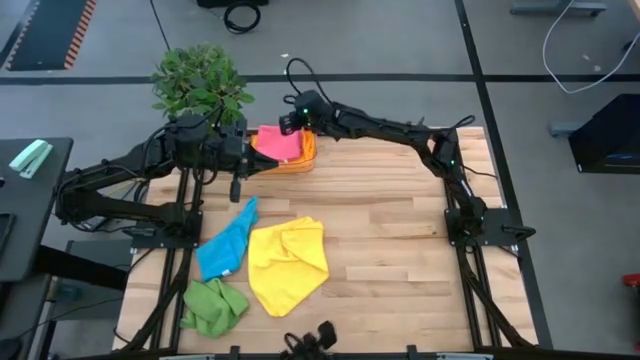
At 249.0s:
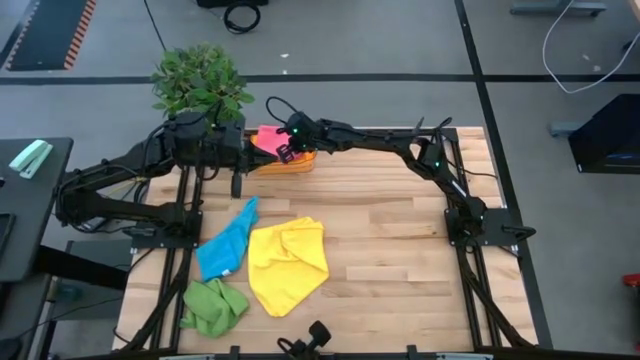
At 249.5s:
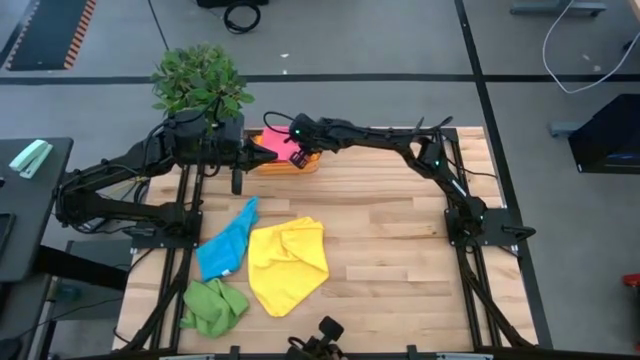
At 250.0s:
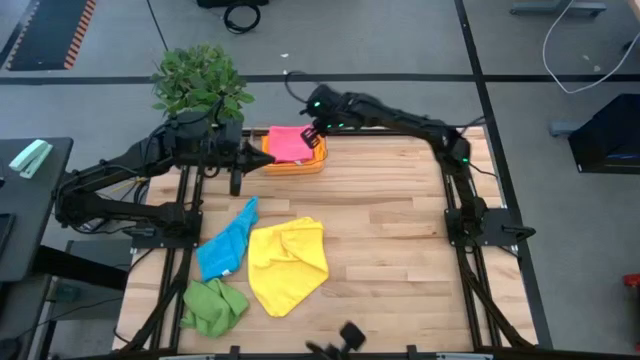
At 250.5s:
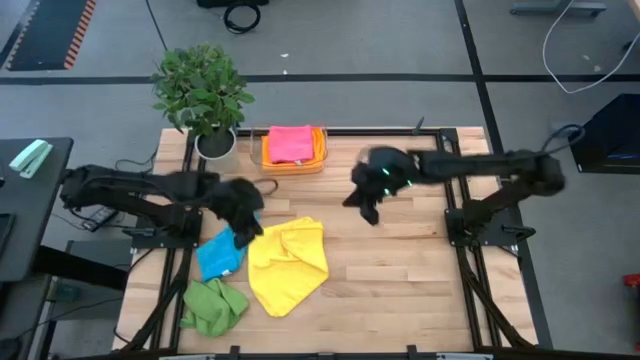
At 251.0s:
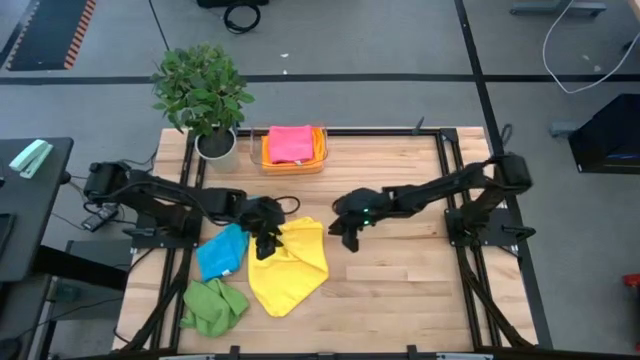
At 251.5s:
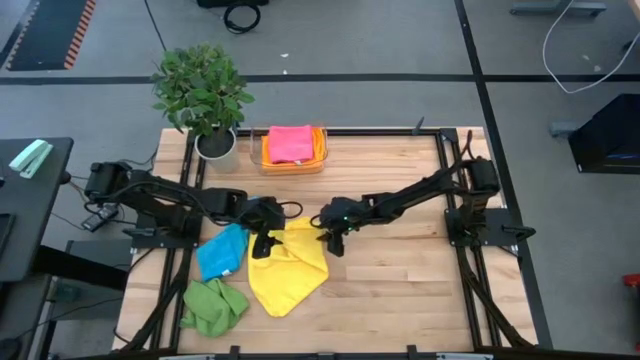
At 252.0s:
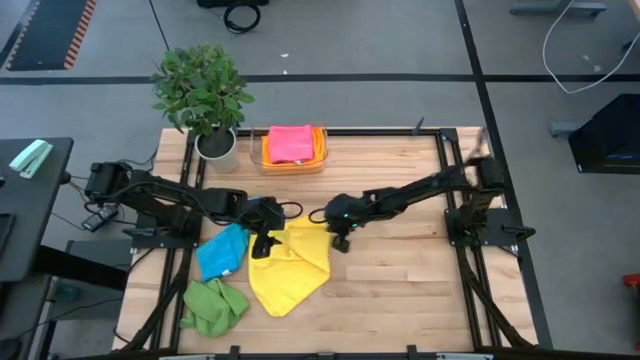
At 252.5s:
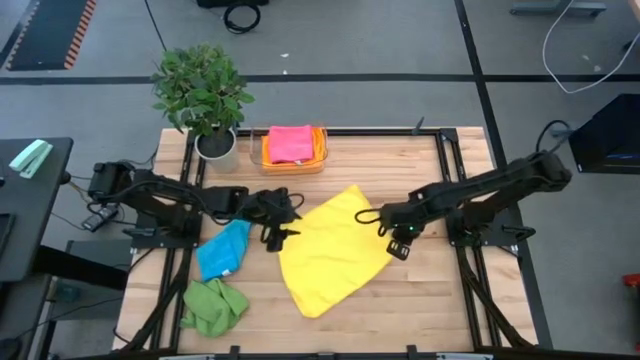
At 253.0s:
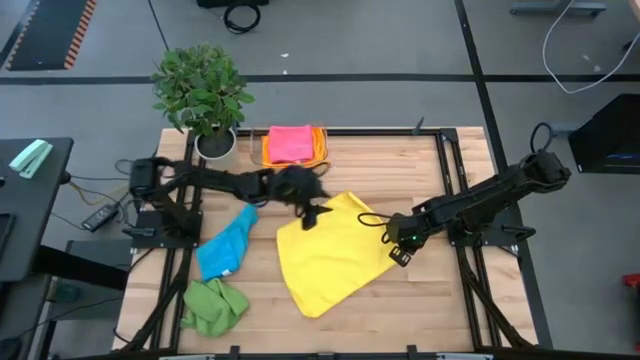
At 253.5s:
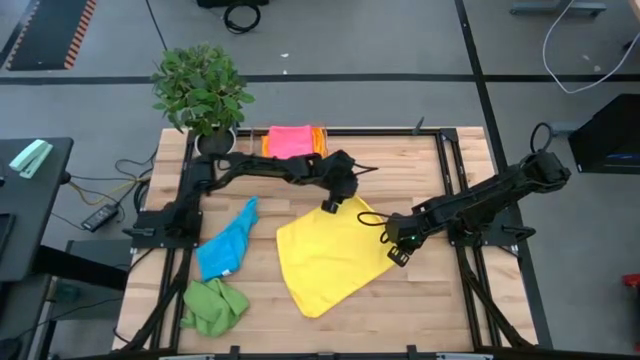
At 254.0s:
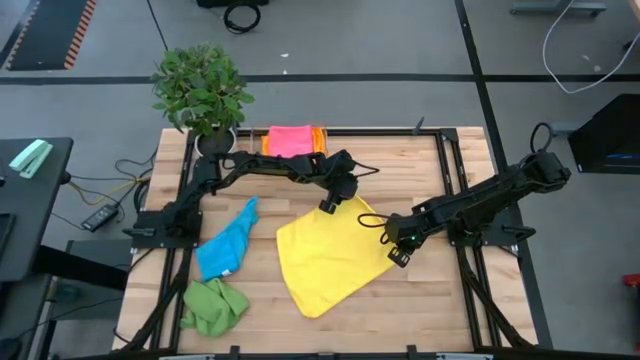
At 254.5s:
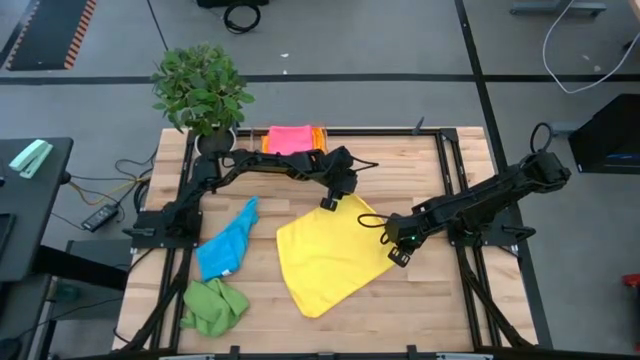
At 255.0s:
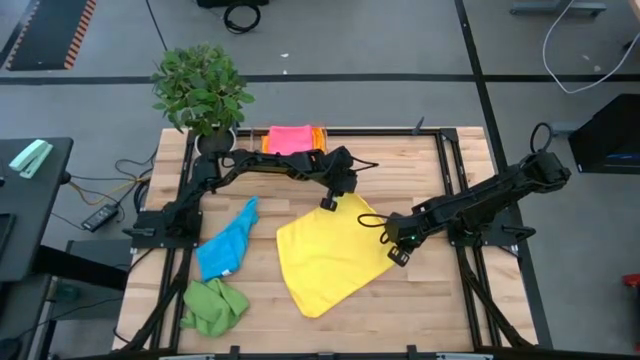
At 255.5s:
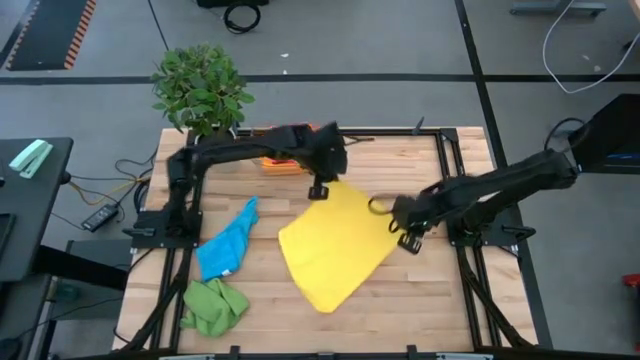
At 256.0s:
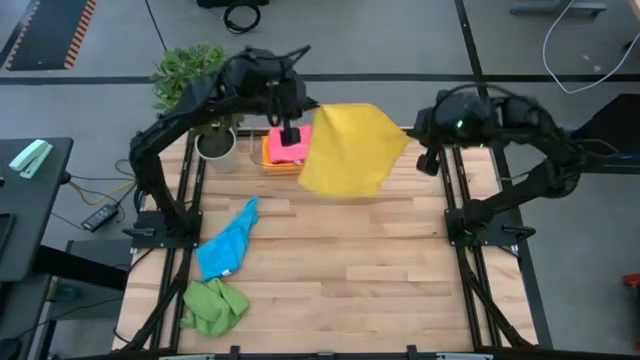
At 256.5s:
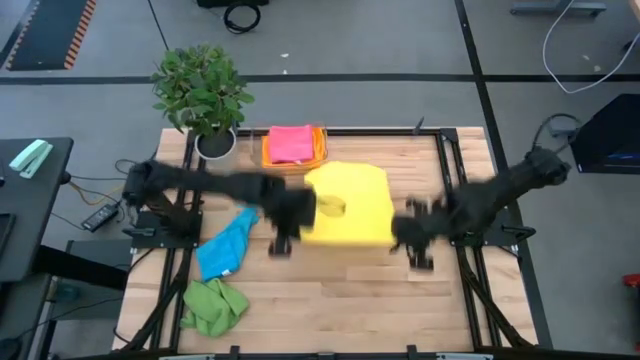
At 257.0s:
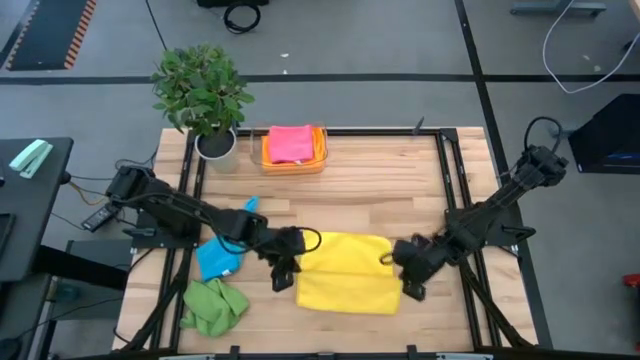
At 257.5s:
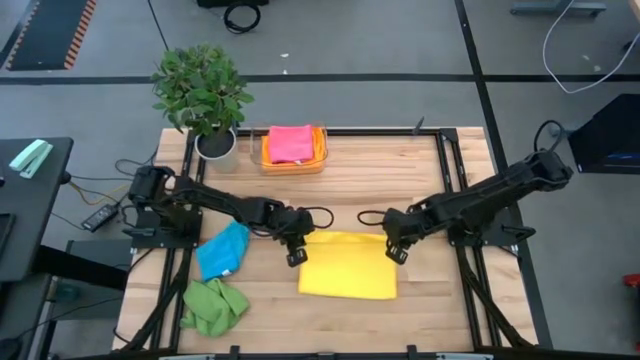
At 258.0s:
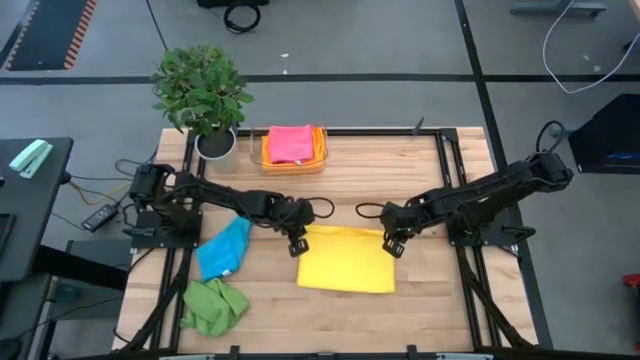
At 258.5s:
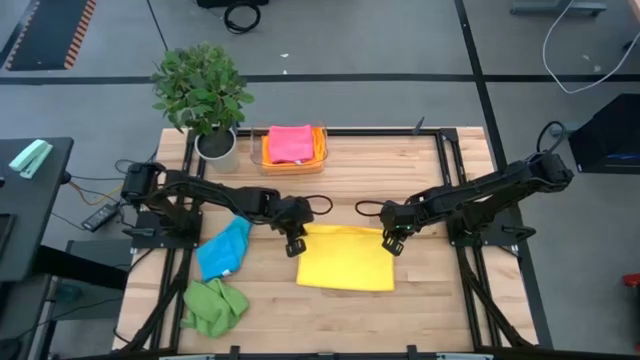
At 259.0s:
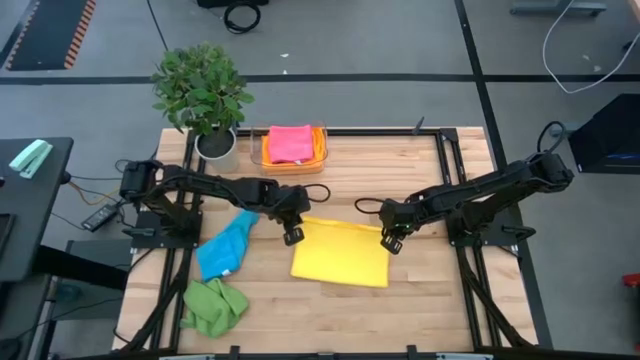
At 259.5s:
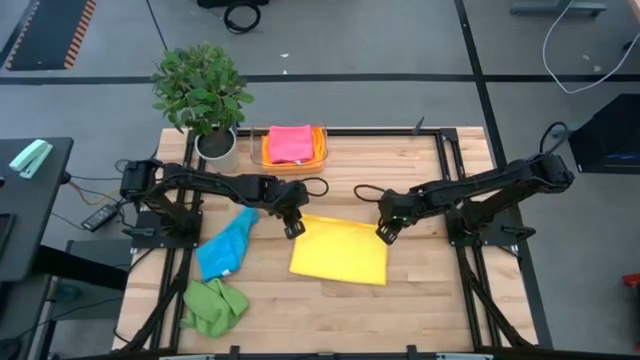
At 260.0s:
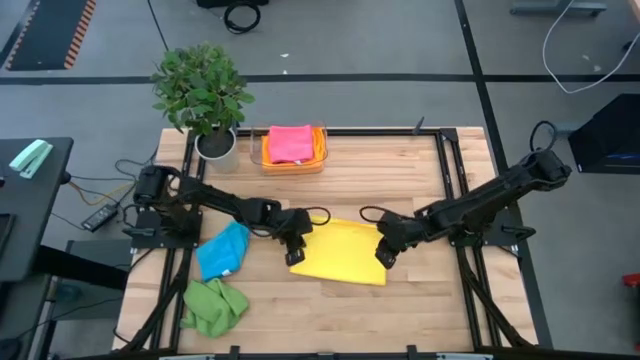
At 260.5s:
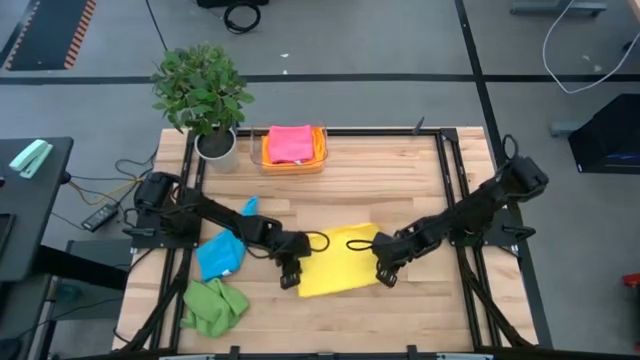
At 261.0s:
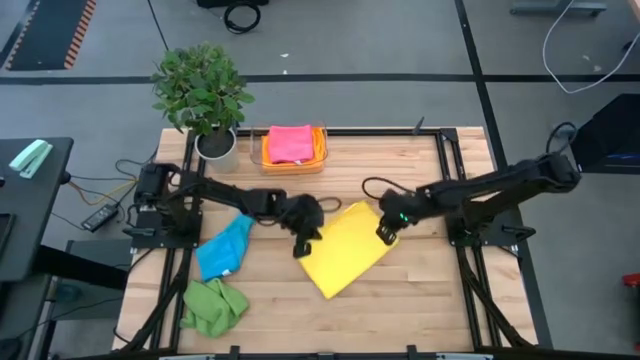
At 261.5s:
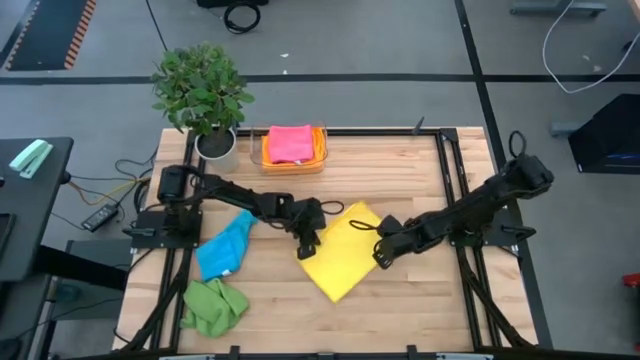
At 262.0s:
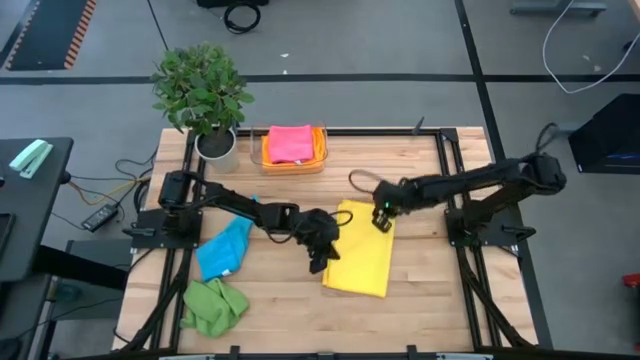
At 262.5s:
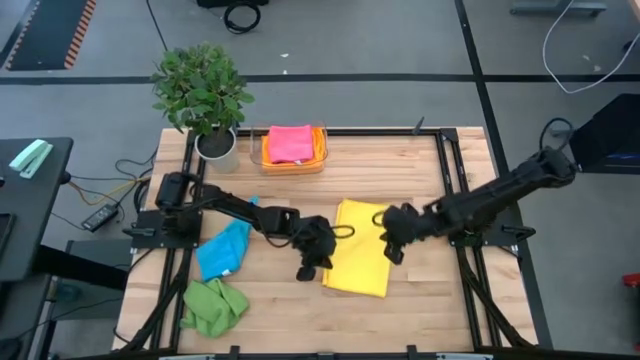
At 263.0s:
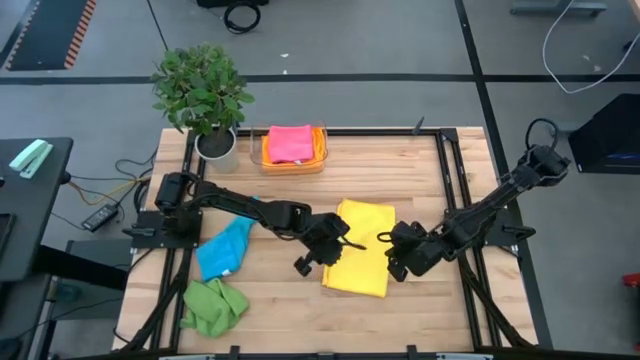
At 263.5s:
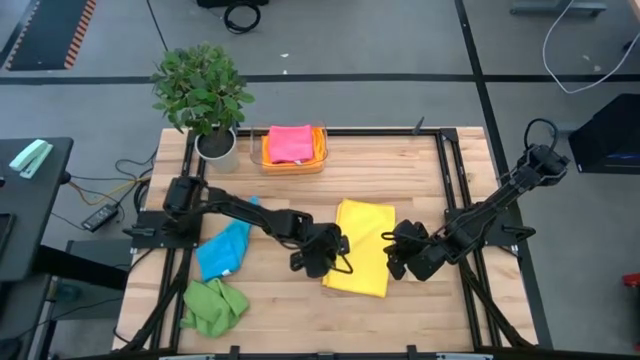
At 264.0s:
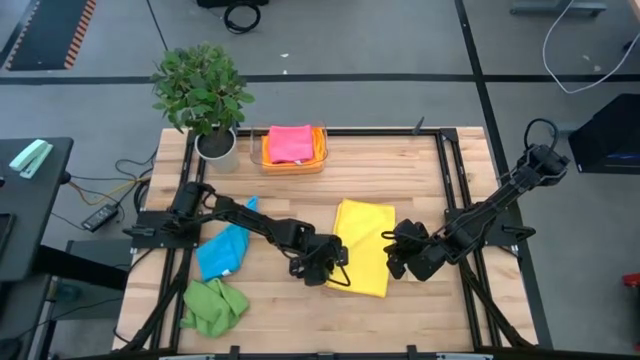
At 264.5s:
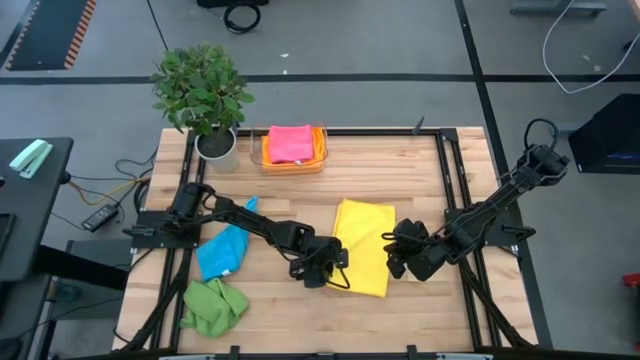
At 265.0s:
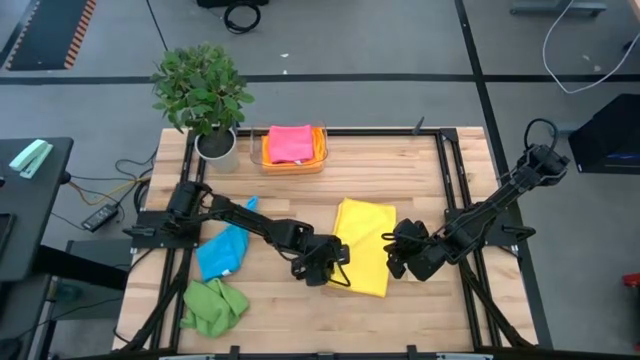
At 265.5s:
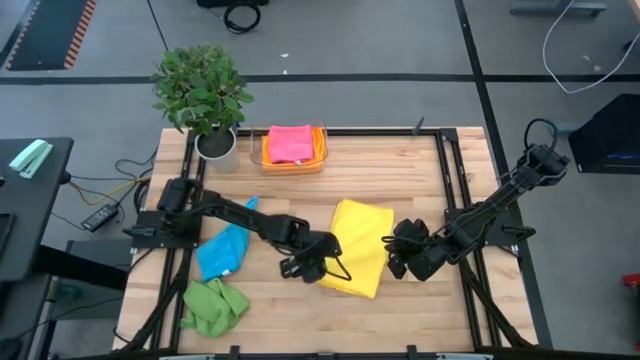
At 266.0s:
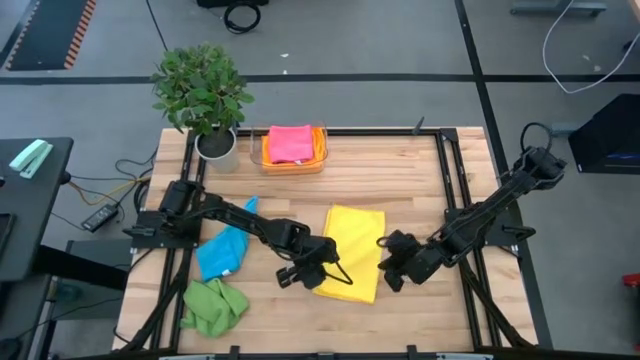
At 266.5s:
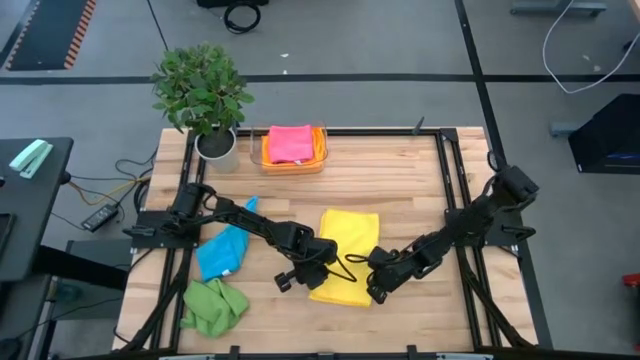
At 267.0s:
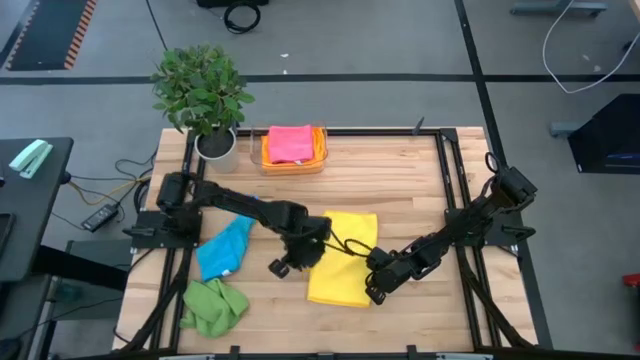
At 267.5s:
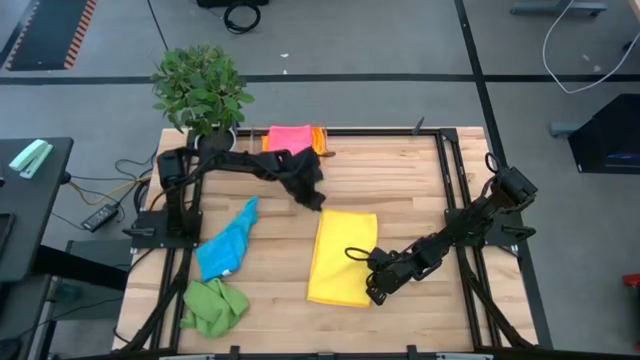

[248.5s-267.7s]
Task: Fold microfiber towels
Fold the yellow microfiber cloth

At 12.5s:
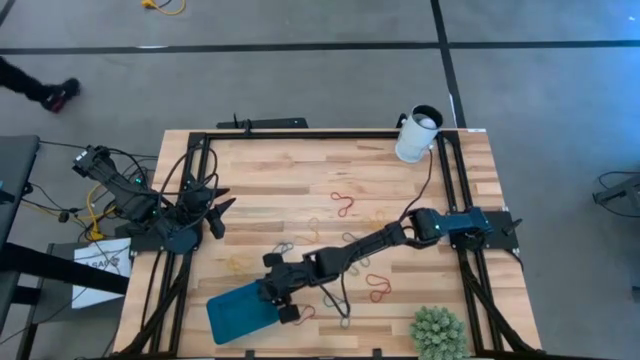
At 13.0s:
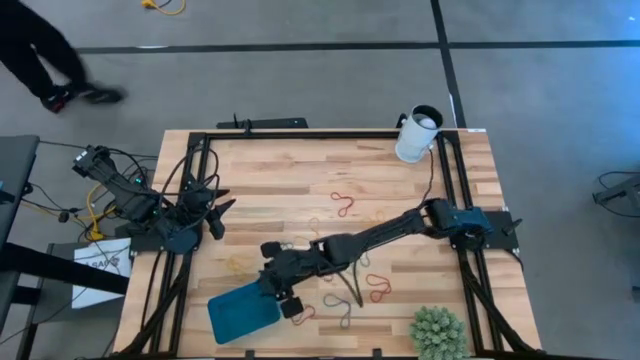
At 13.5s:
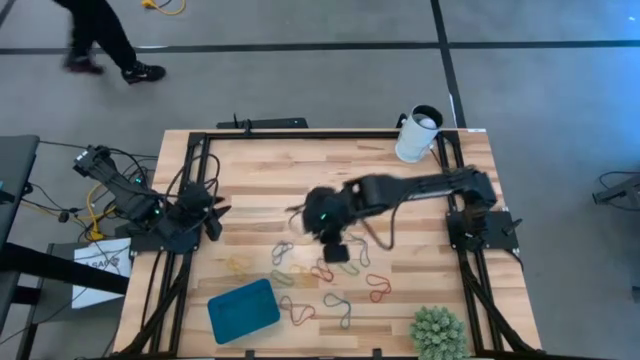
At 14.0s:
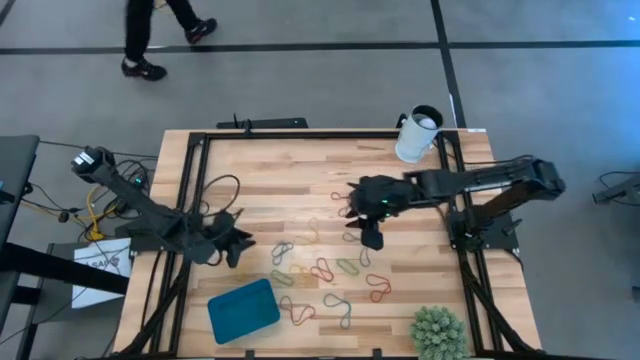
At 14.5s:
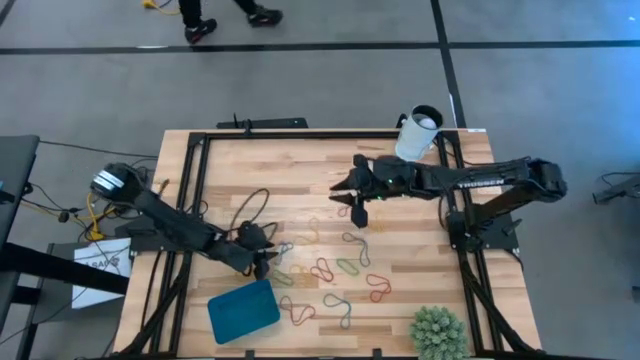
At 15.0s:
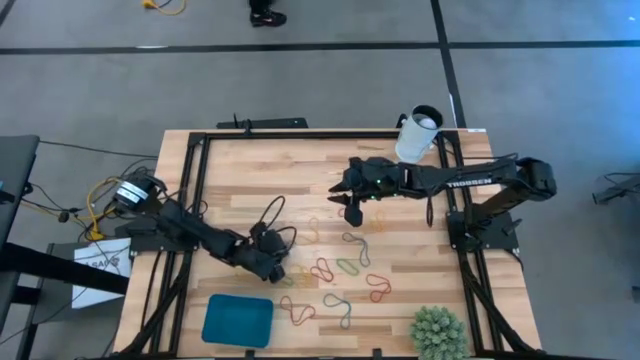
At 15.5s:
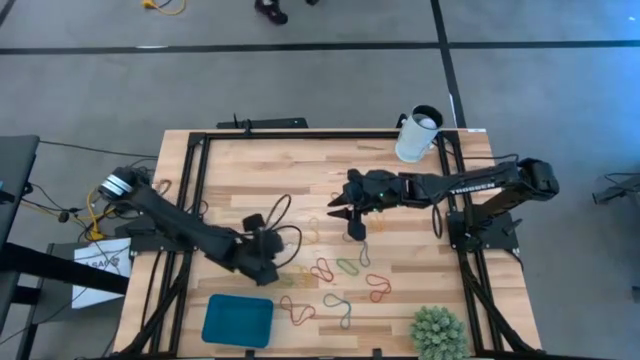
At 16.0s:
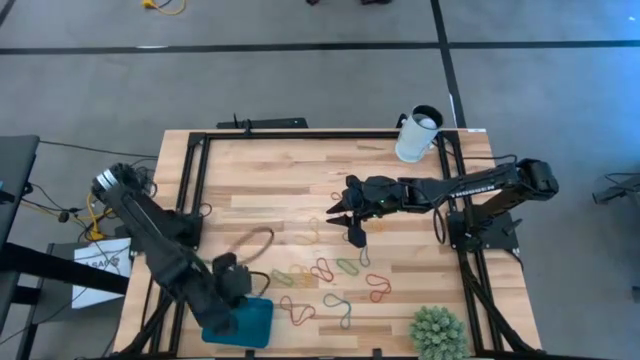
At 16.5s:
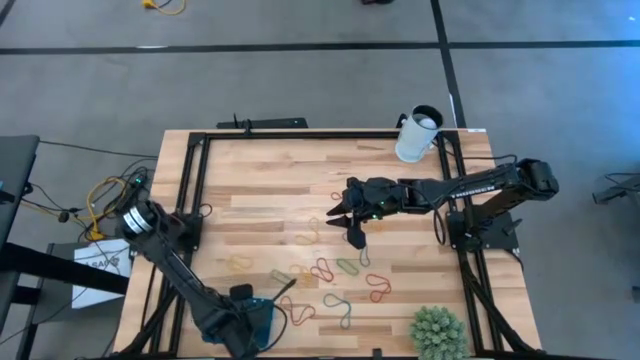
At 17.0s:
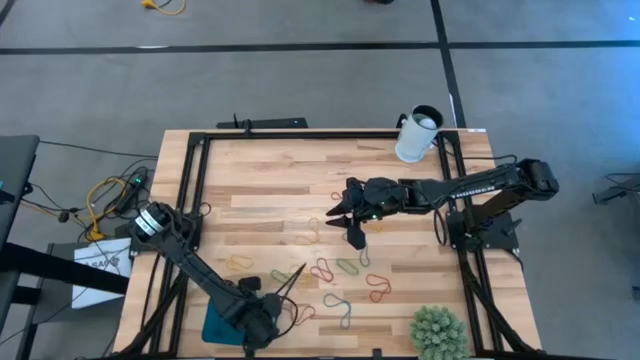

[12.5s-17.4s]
Task: Pick and place items into bin
Put the blue rubber band into the blue bin
